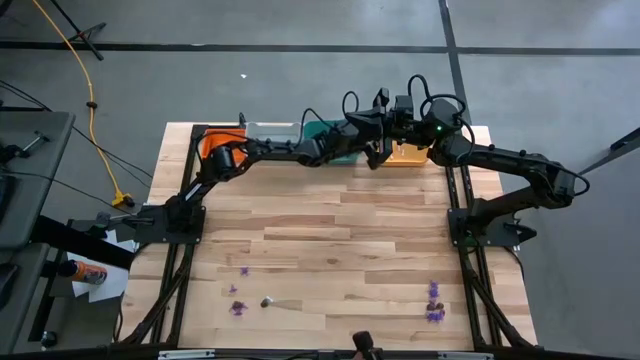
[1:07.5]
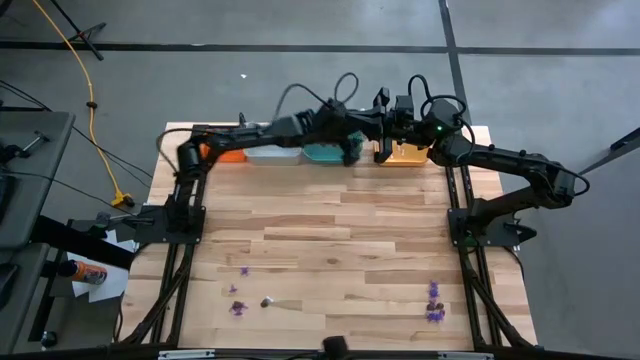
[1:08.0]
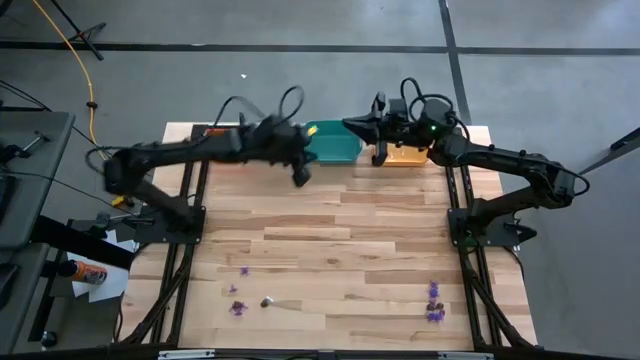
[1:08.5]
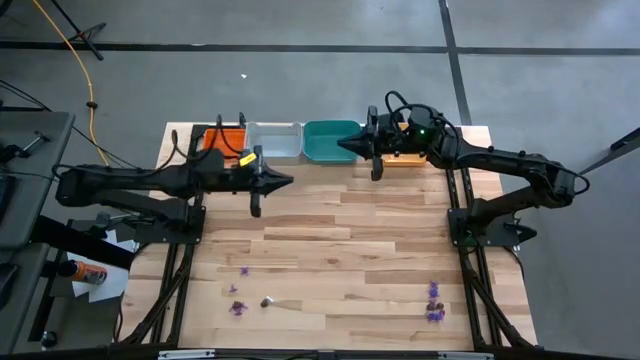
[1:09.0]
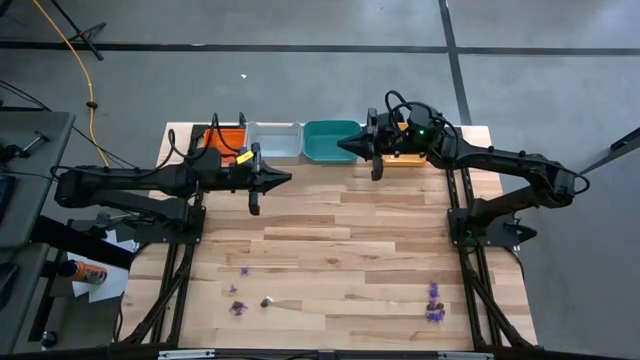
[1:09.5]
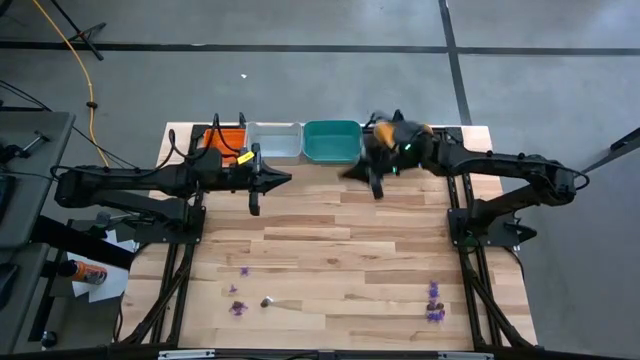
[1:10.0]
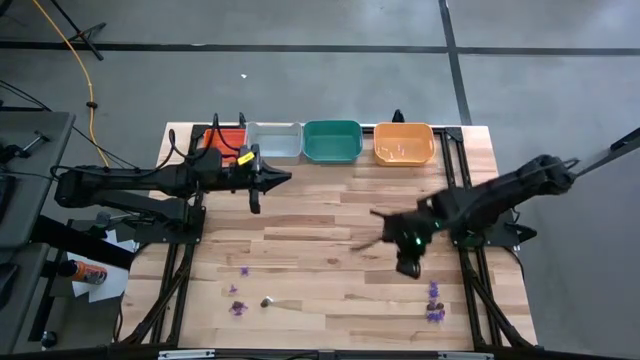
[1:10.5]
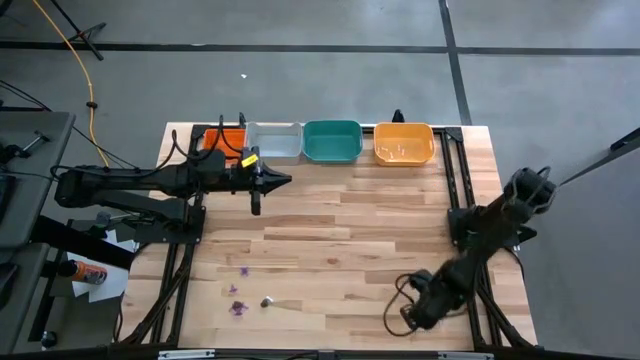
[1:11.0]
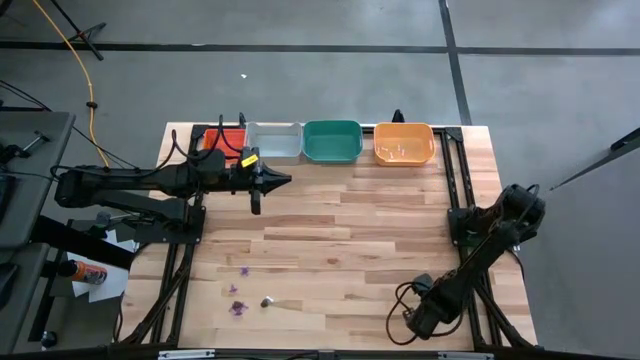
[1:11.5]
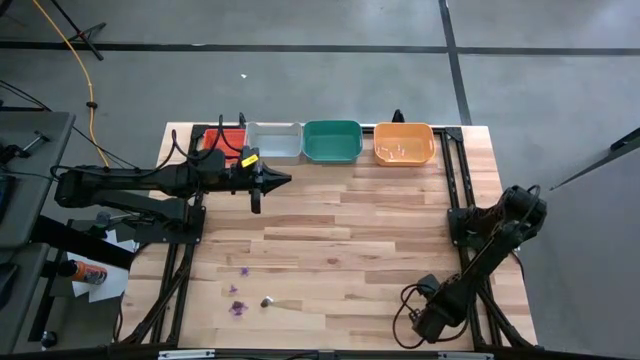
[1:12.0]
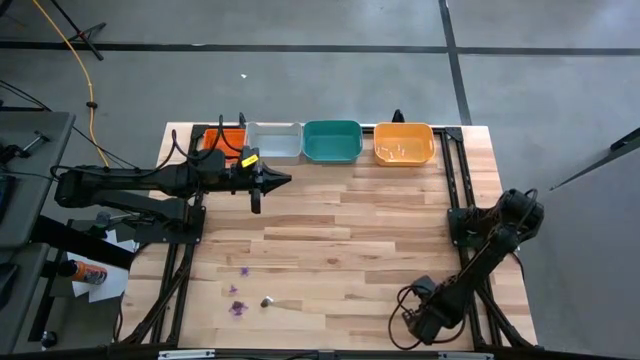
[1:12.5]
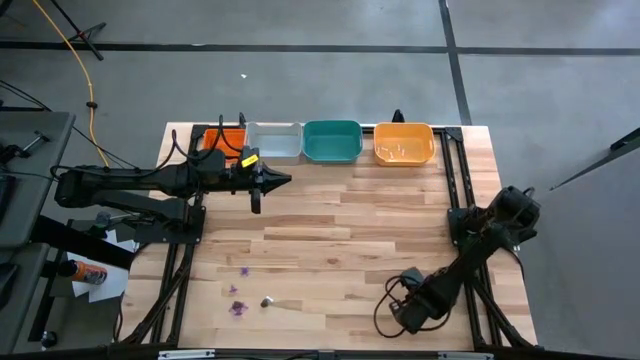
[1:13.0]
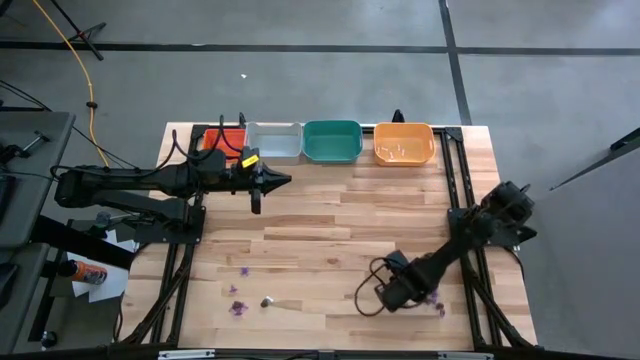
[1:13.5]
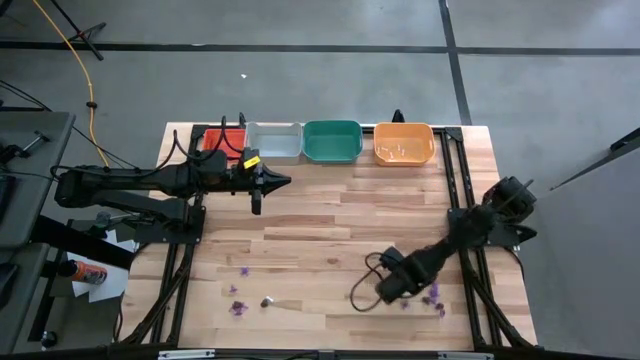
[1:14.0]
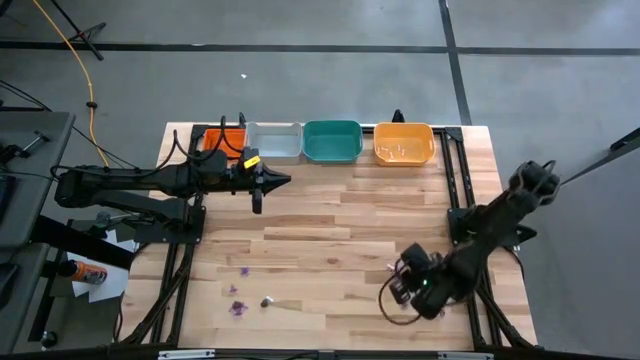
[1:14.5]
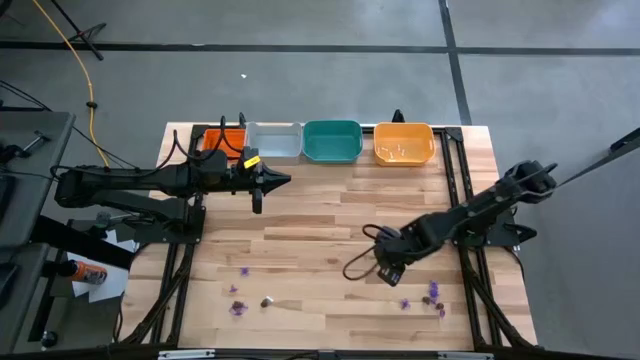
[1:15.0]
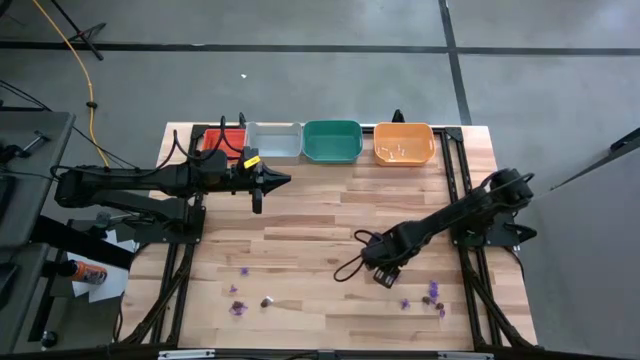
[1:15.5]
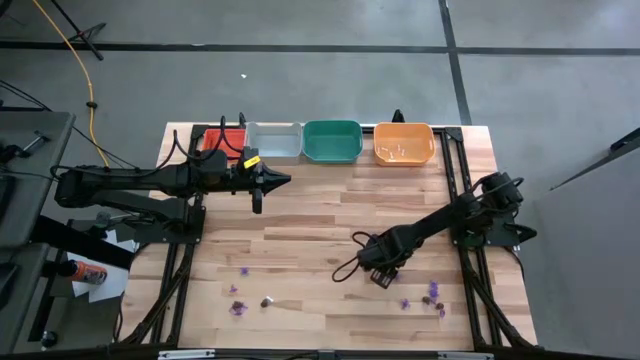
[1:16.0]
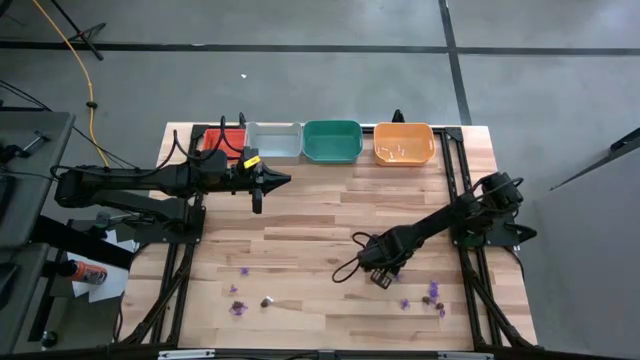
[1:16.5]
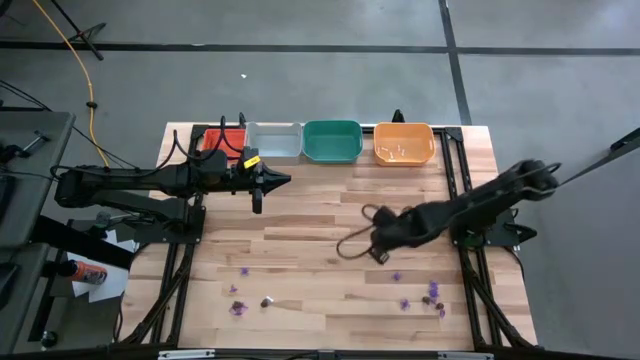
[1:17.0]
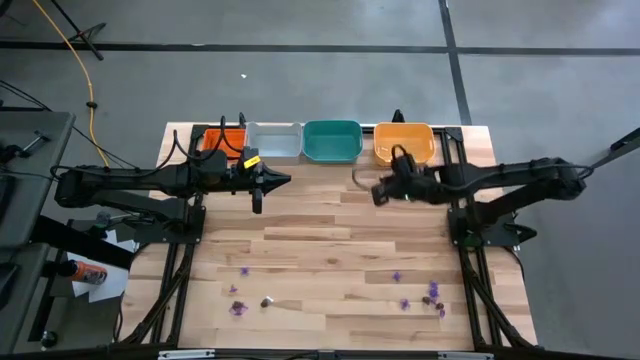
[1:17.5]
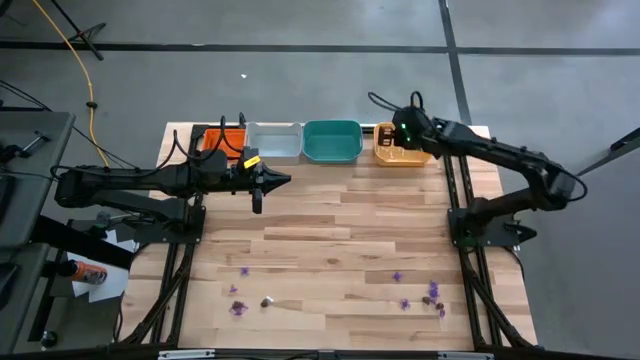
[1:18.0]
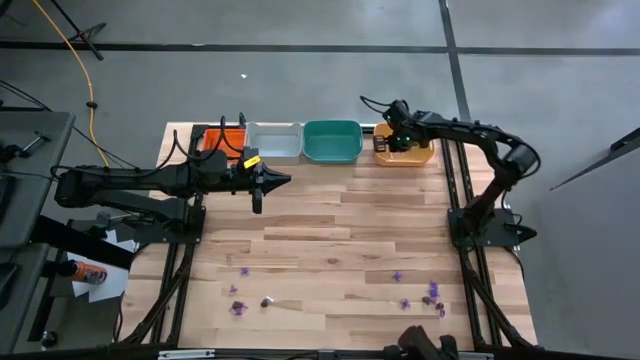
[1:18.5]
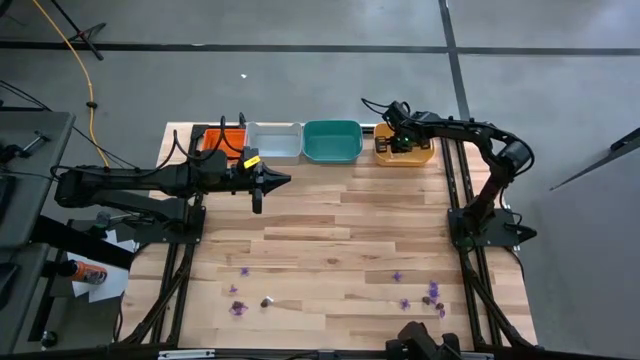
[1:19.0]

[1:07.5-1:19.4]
Task: Sort Halloween decoration
Put the white bone into the yellow bin

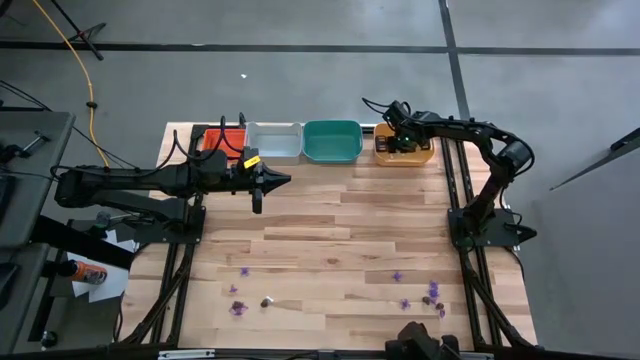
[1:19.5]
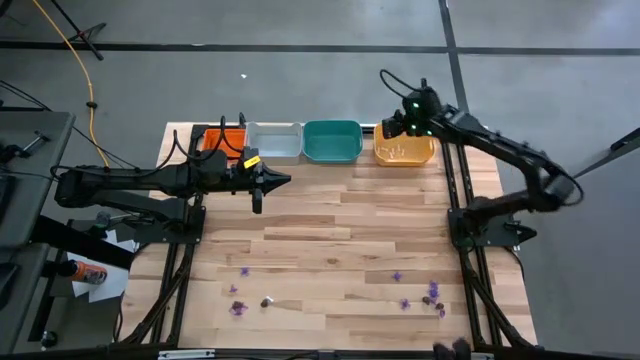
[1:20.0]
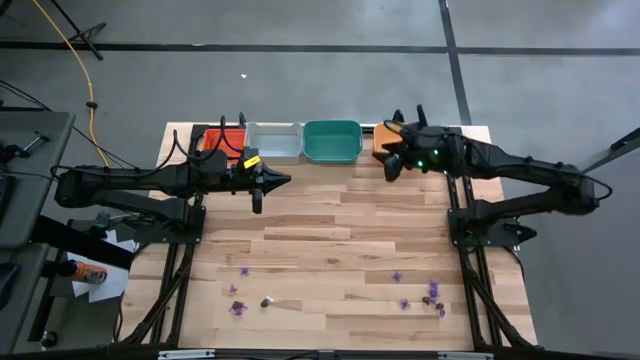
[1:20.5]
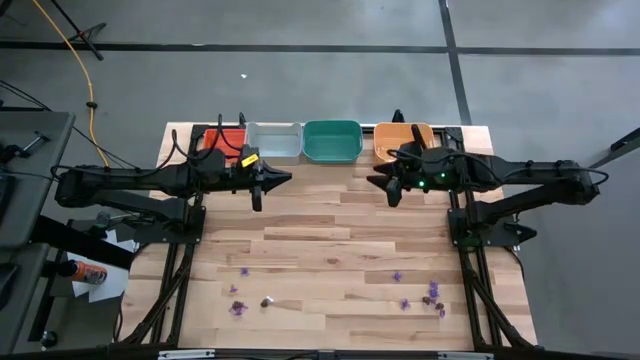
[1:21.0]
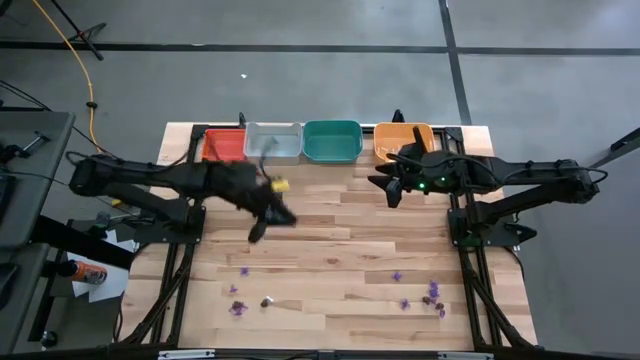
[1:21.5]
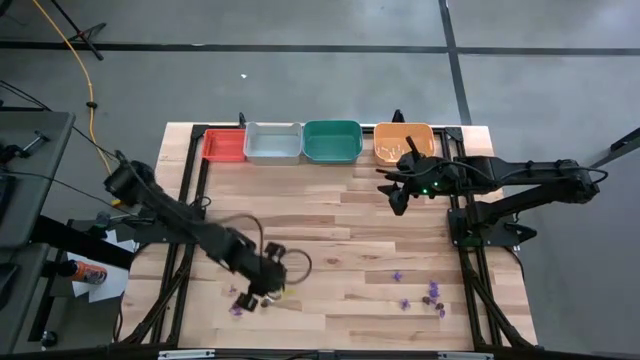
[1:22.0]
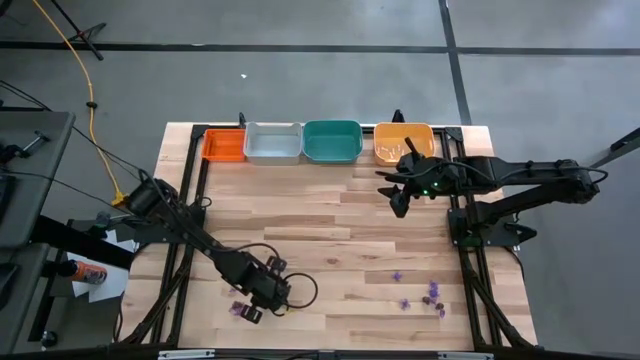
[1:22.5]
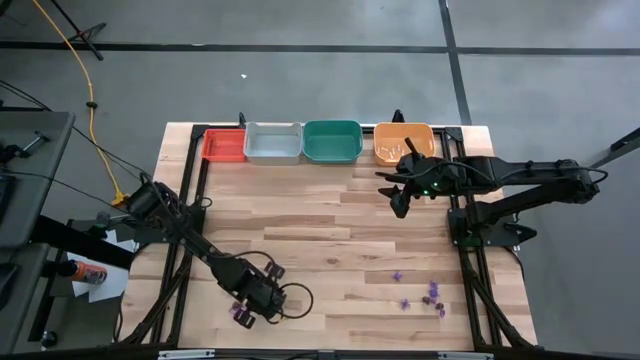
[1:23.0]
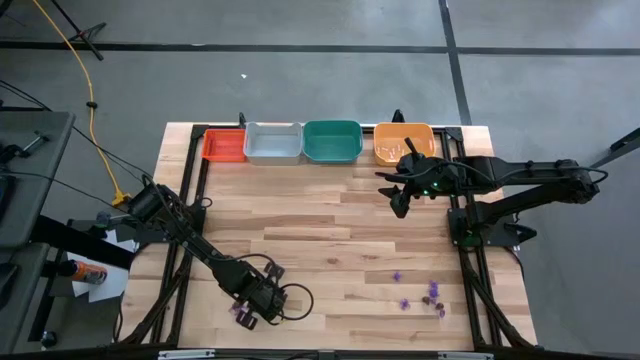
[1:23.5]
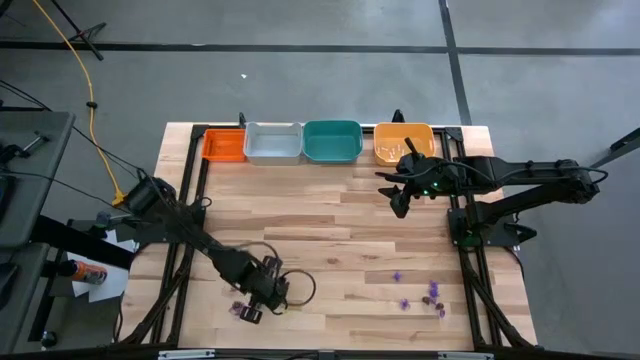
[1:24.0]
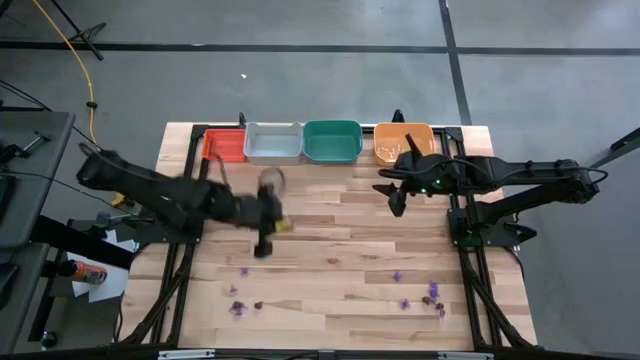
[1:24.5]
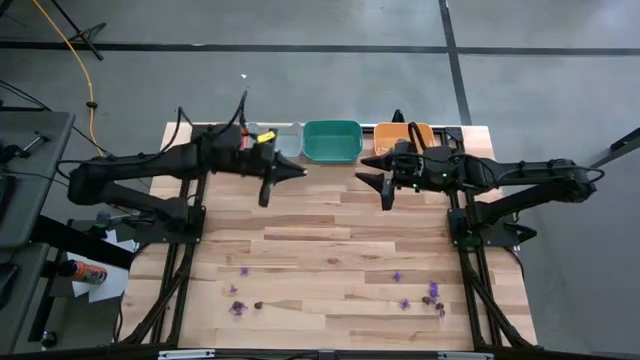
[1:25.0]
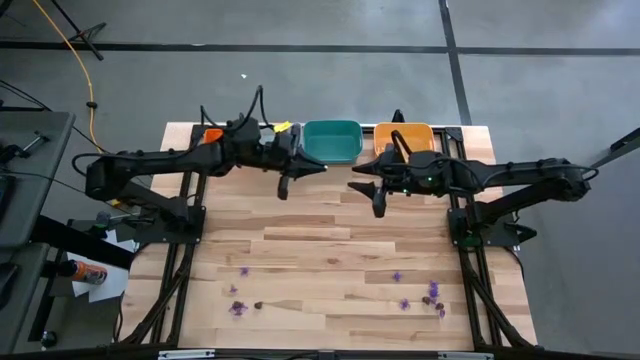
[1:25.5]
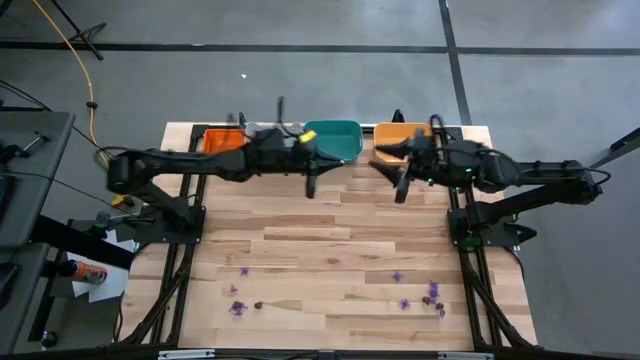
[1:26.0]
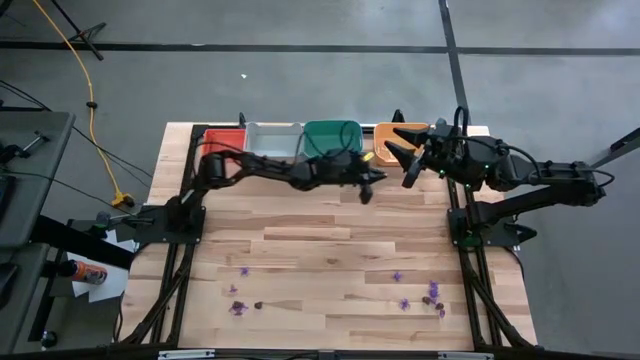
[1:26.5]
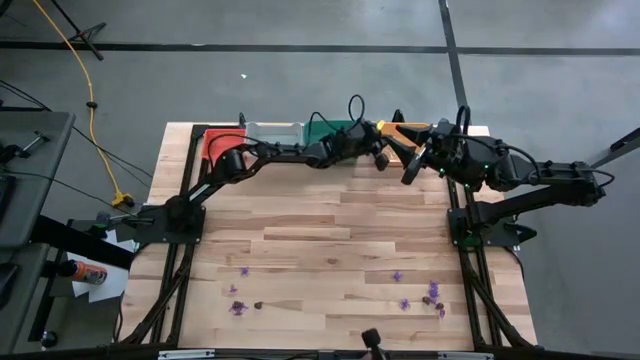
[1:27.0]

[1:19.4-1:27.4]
Put the white bone into the yellow bin

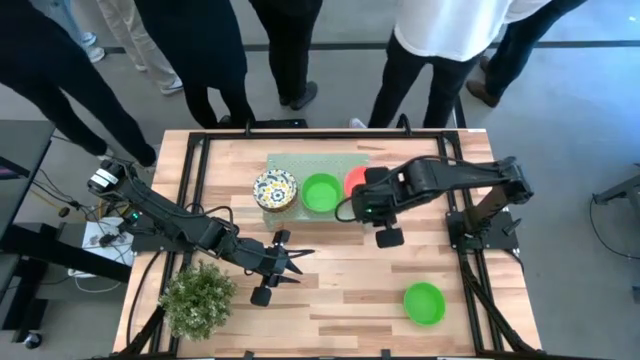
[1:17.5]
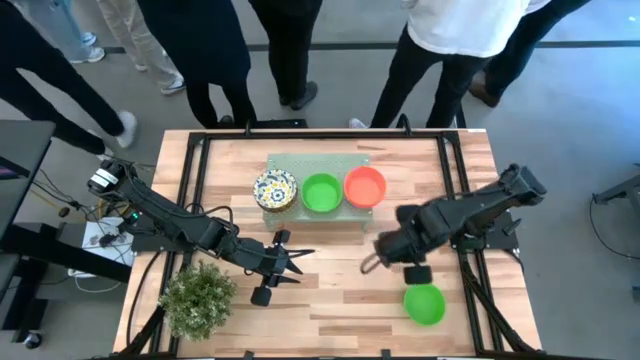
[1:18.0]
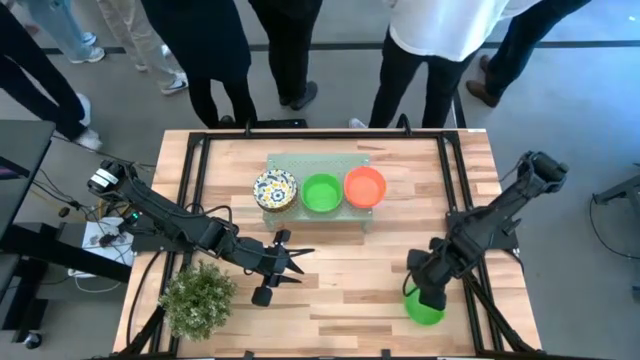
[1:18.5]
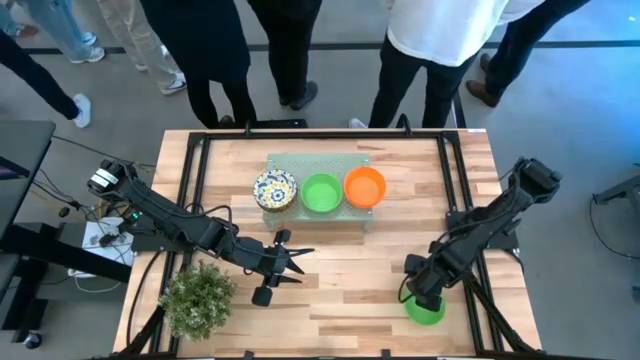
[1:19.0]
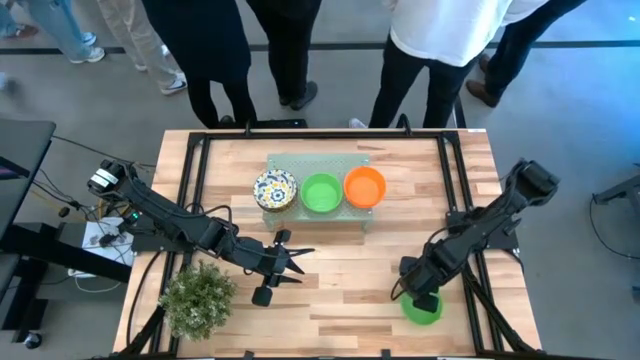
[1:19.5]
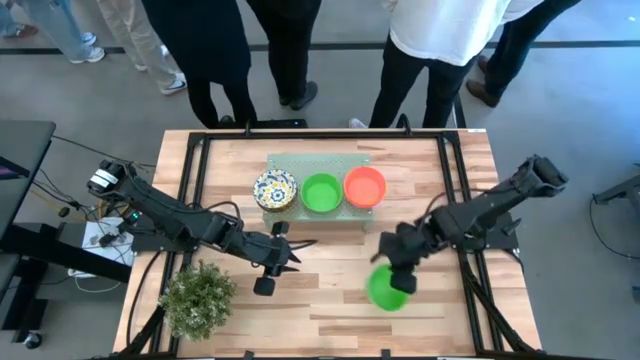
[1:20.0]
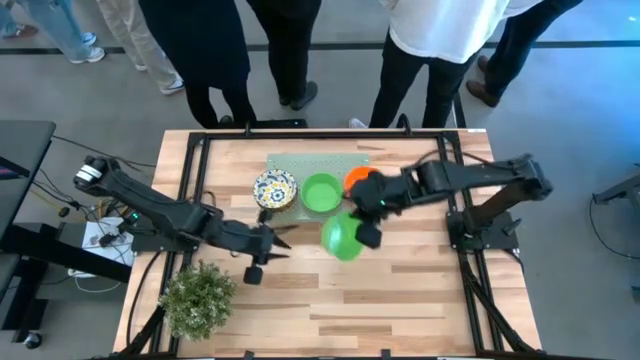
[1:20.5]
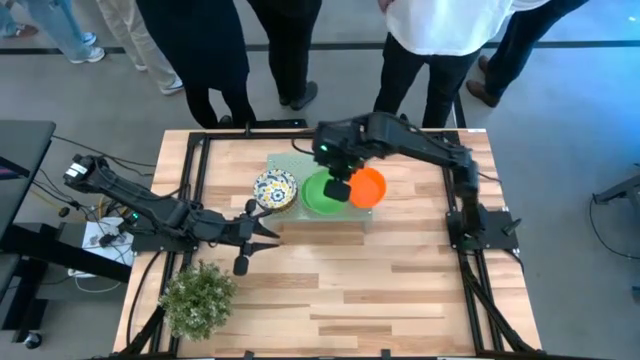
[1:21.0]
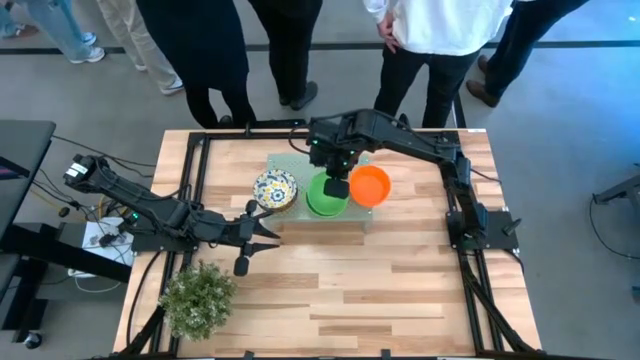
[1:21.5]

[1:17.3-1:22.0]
Task: Pick & Place Mini bowls
Stack the green bowl on top of the green bowl on the shelf
